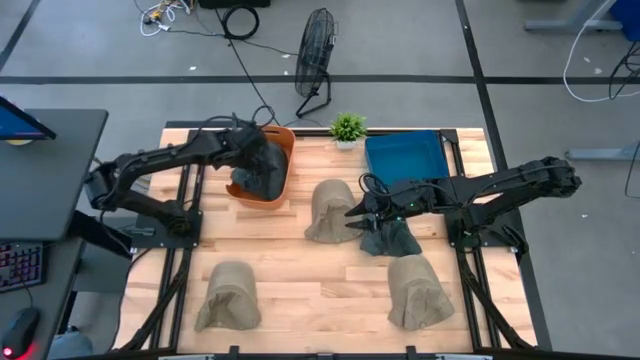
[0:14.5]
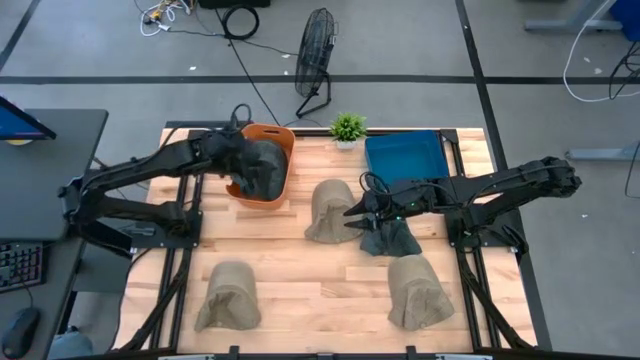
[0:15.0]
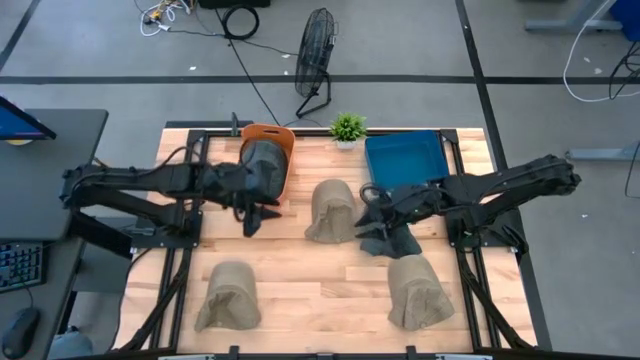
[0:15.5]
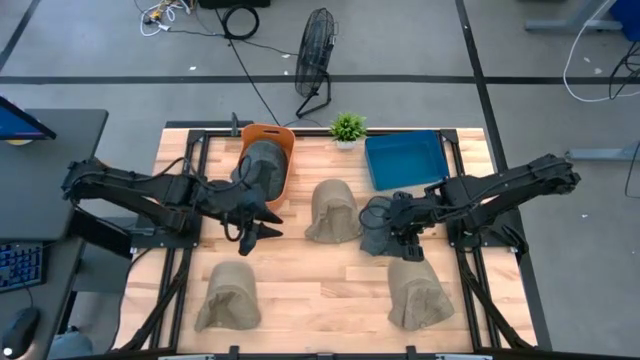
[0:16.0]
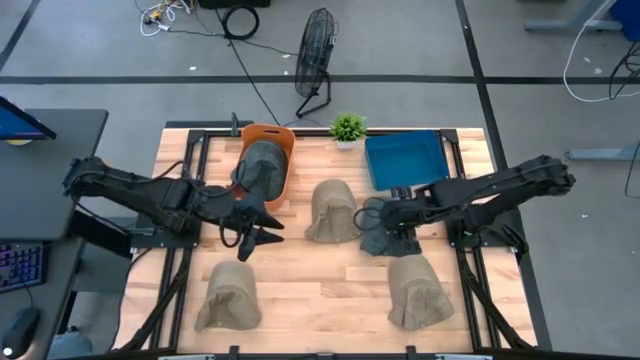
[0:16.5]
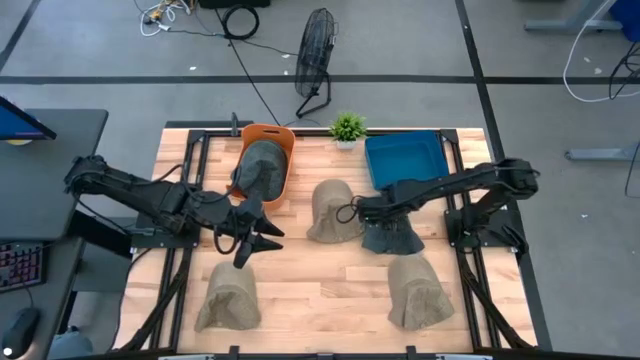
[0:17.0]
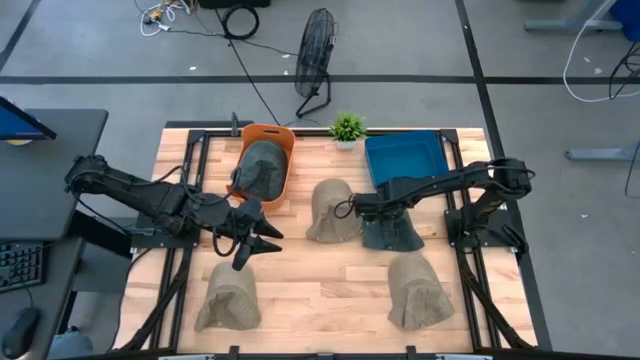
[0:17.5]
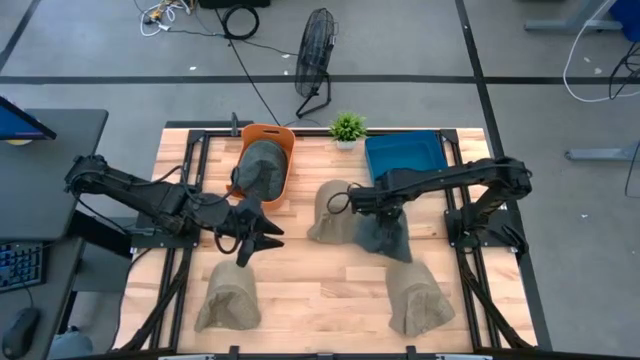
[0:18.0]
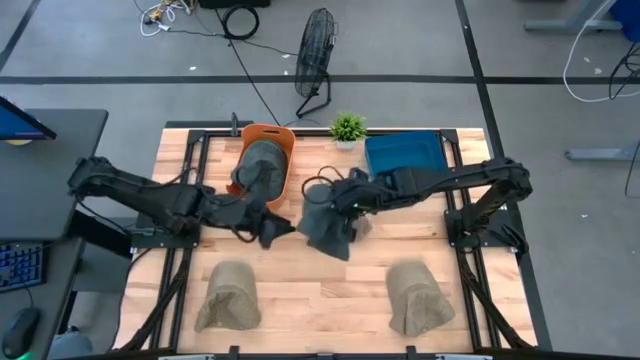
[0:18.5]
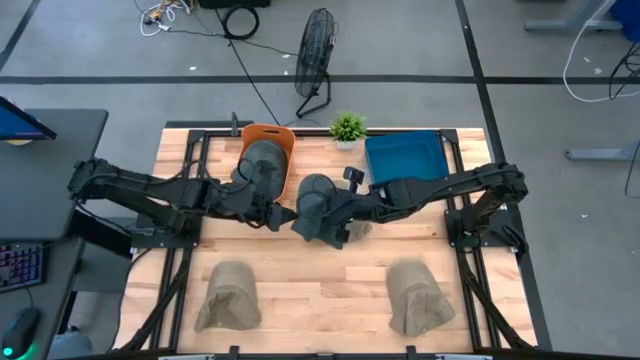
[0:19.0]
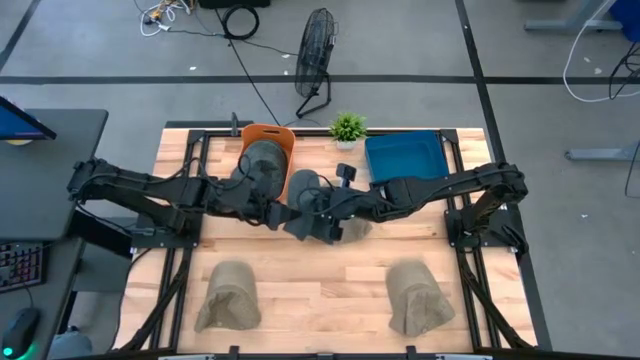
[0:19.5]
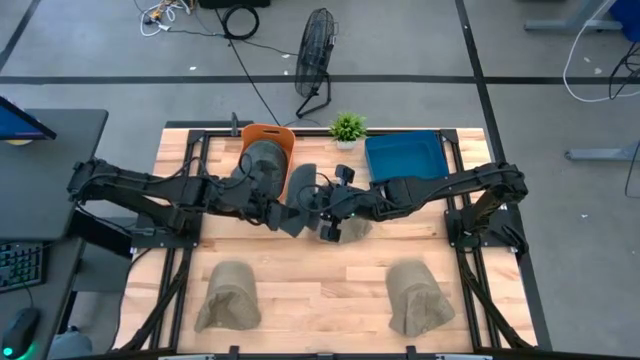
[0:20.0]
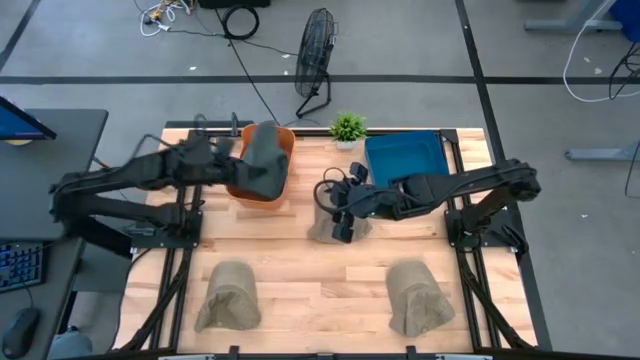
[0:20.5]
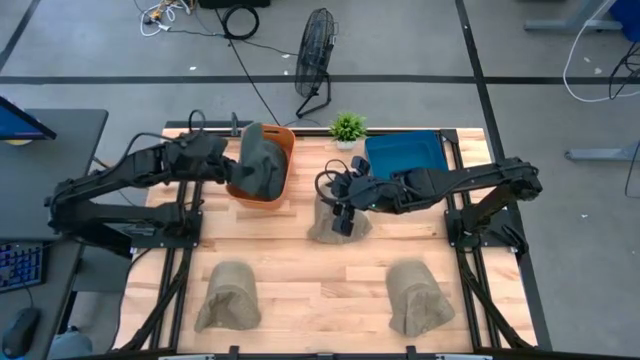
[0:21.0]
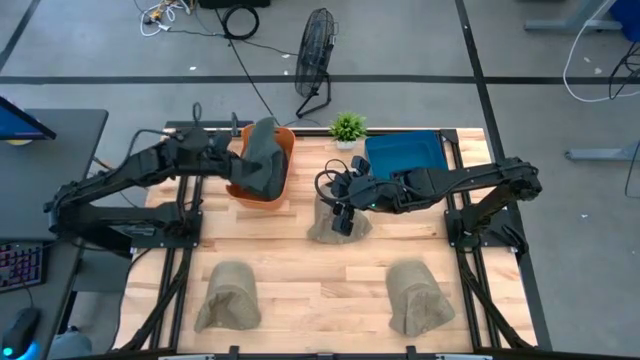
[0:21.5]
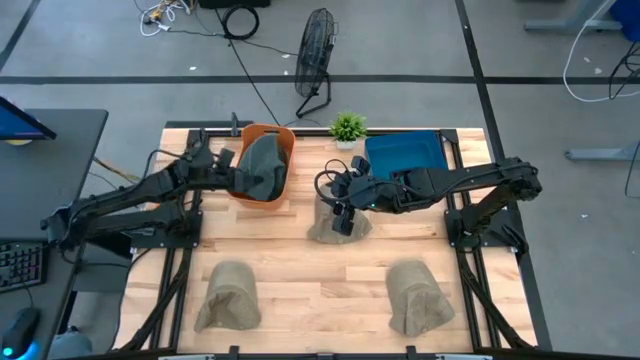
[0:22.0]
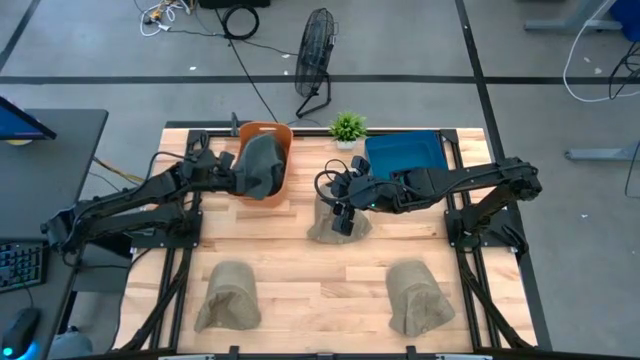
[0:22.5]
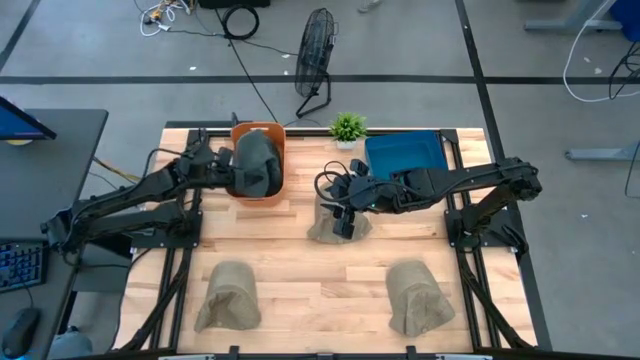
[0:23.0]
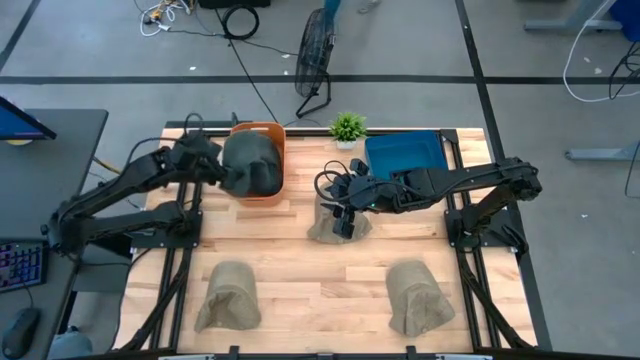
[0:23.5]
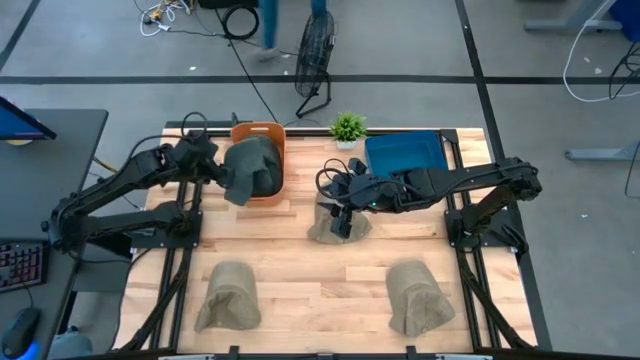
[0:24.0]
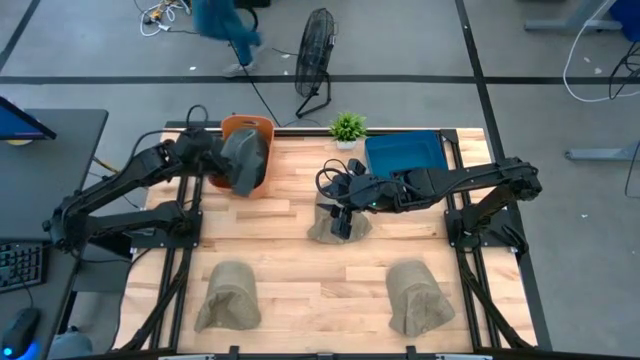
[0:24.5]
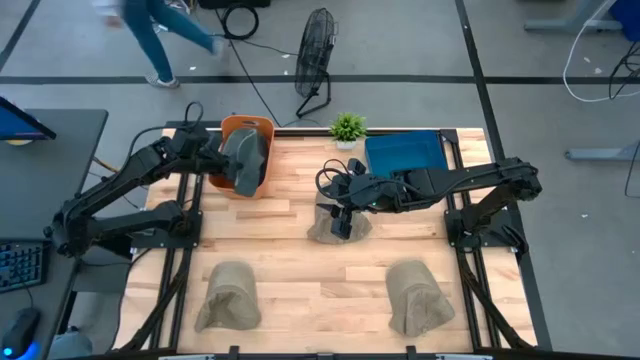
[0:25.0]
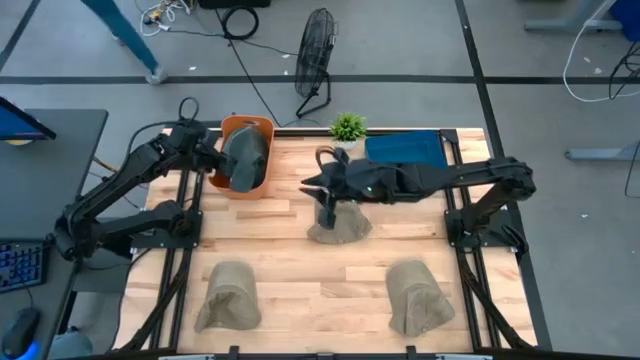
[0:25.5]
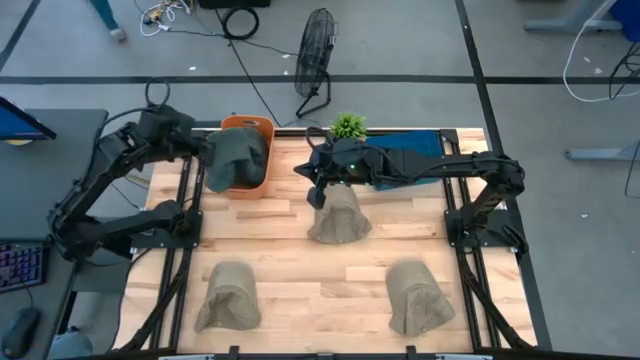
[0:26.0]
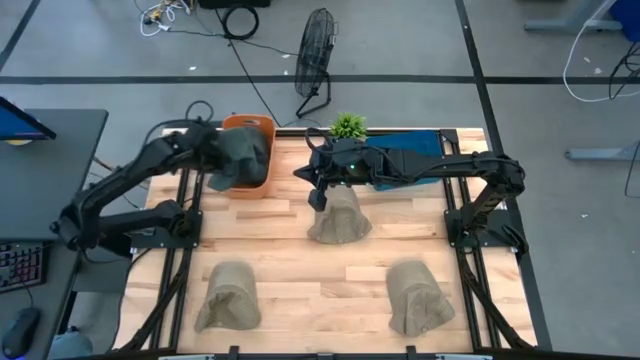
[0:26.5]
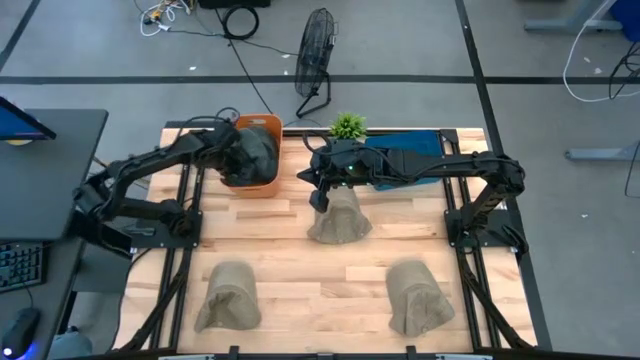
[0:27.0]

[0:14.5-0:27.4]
Task: Pick & Place hat
Put the black cap into the orange bin

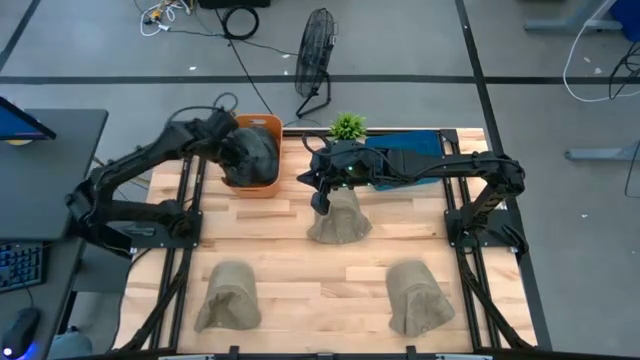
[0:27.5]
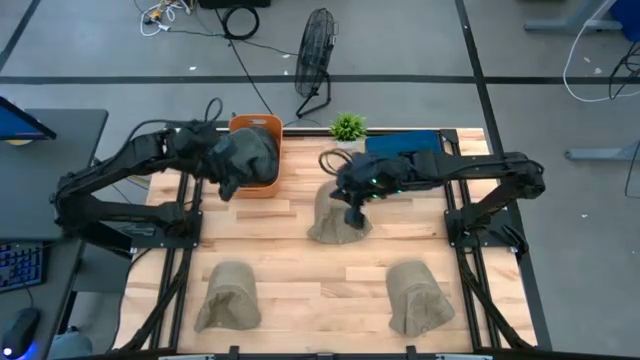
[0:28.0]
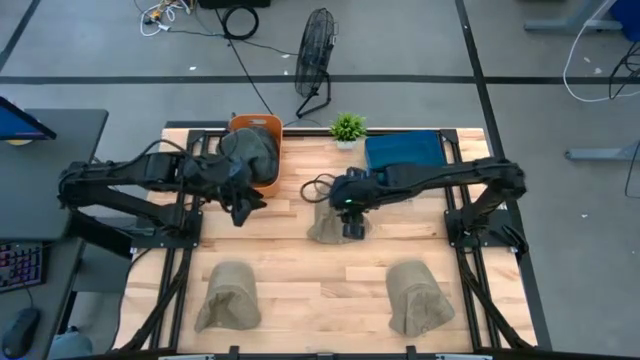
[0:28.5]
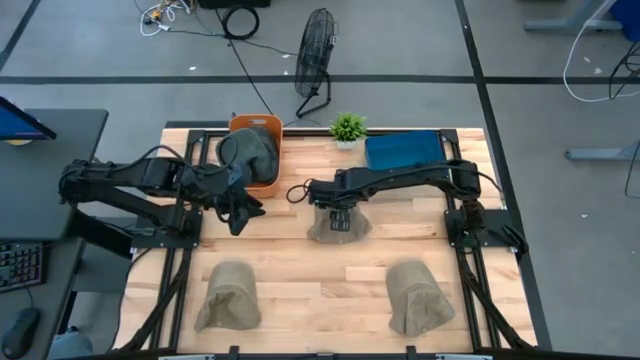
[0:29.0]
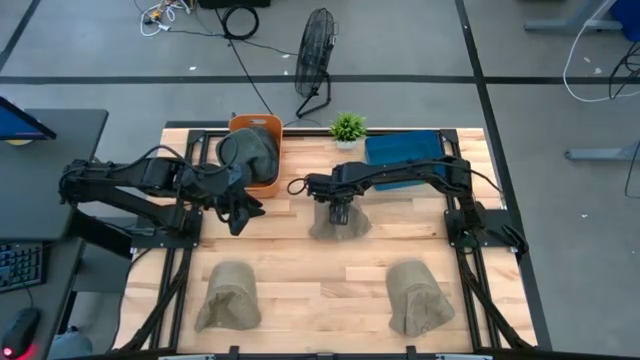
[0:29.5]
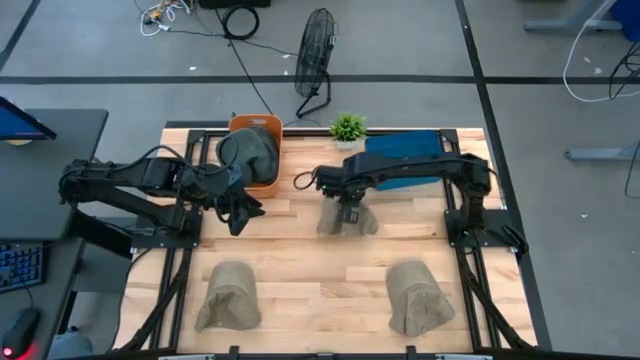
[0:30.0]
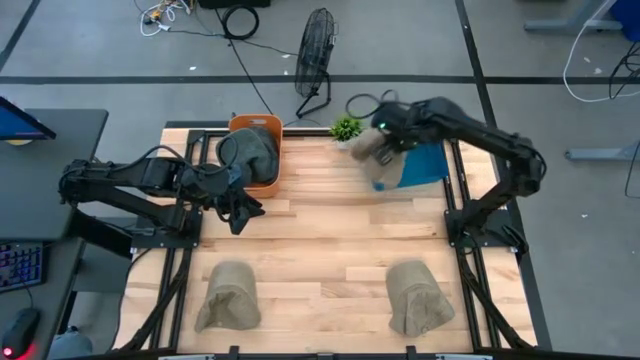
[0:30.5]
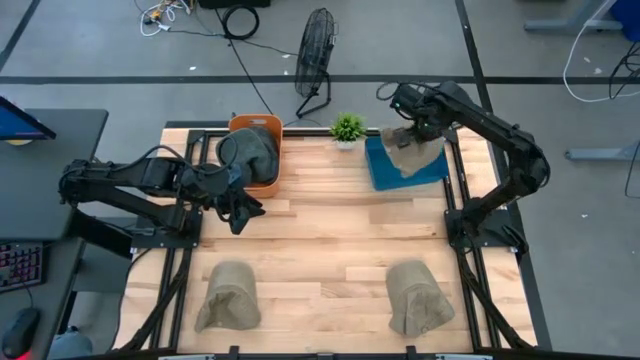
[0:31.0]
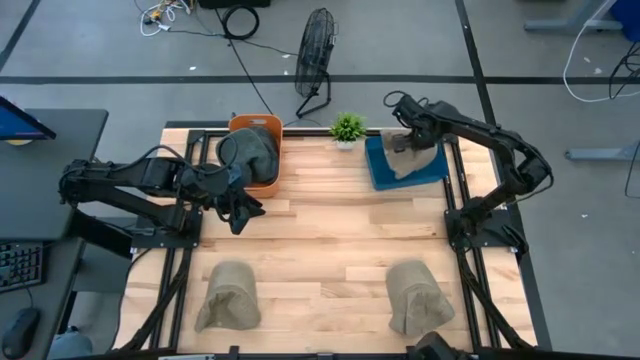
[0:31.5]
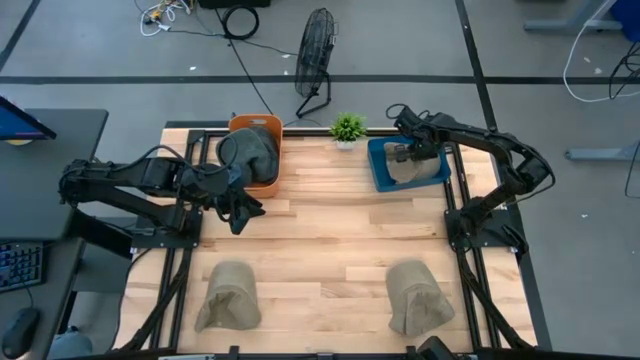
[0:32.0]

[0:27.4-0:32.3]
Put the top brown cap into the blue bin

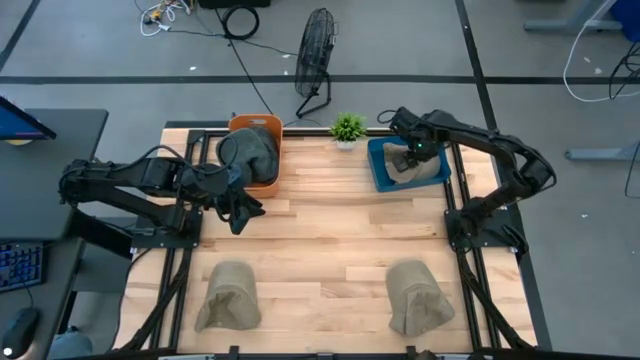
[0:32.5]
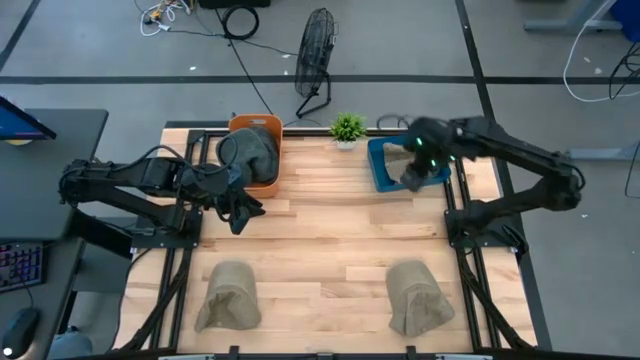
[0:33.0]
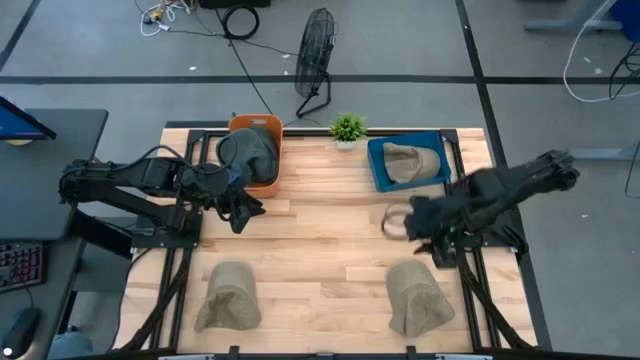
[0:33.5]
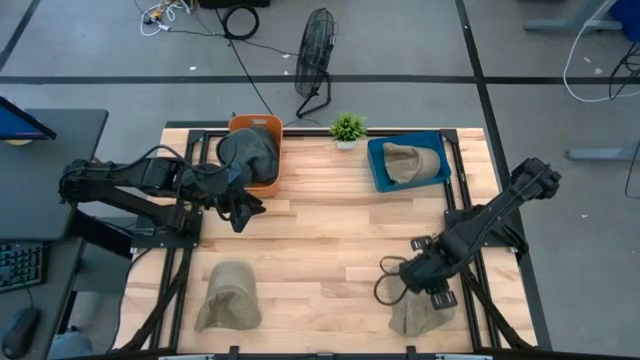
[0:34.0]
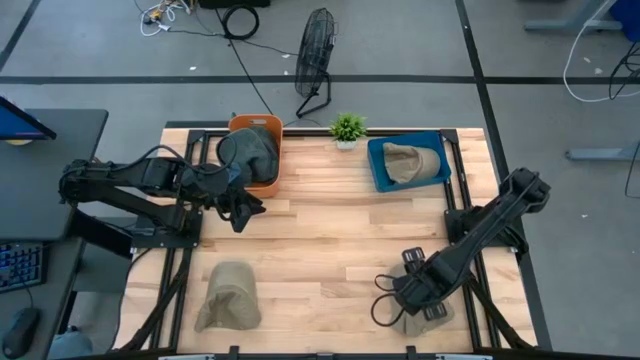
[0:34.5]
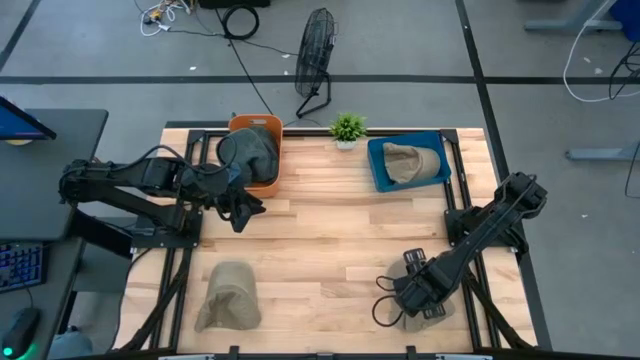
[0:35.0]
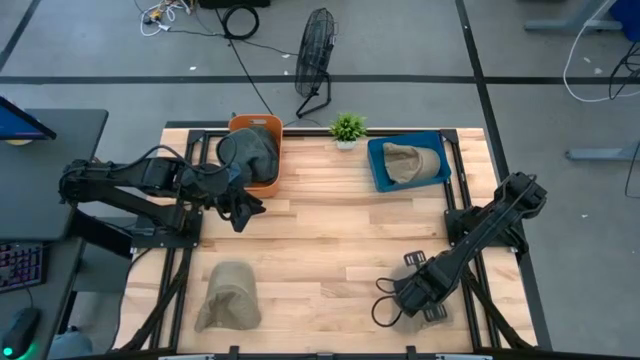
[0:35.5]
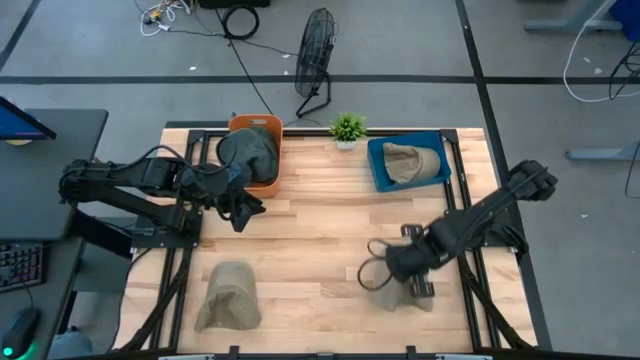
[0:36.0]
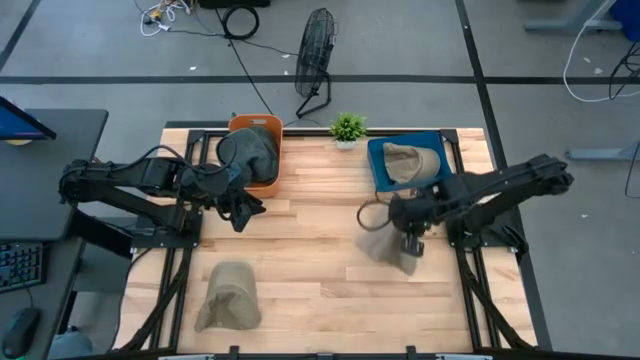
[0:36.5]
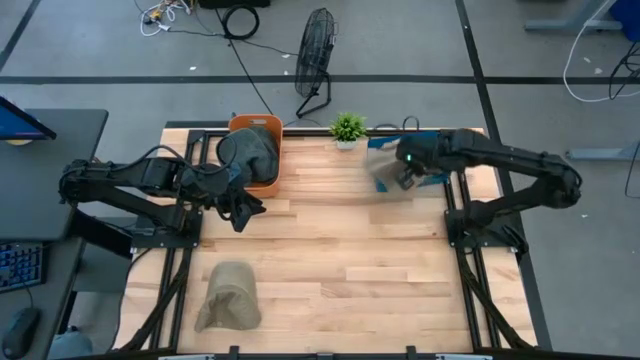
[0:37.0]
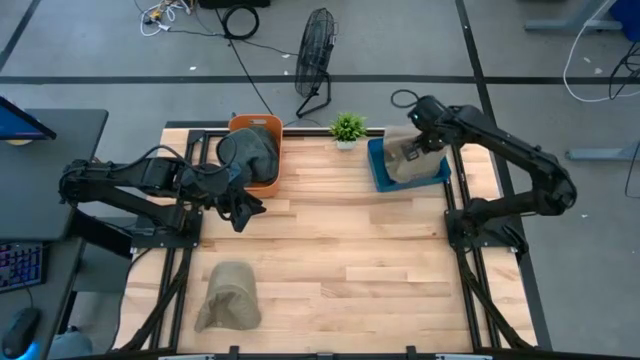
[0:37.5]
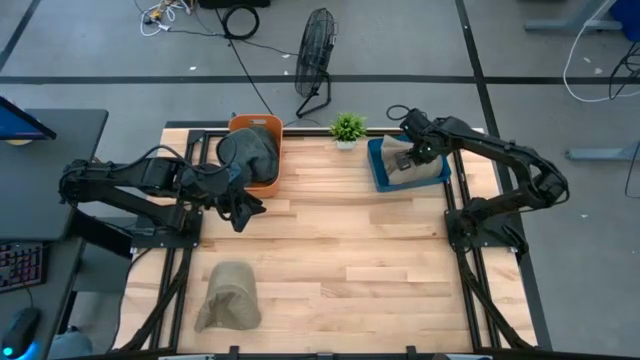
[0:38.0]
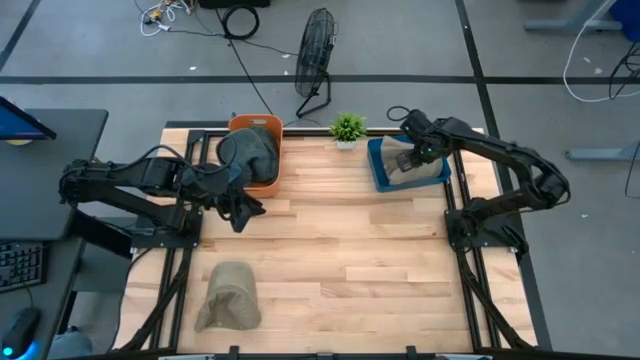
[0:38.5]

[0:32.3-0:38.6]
Put the right brown cap into the blue bin
